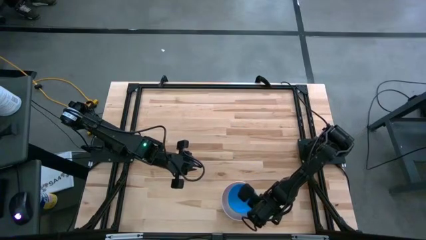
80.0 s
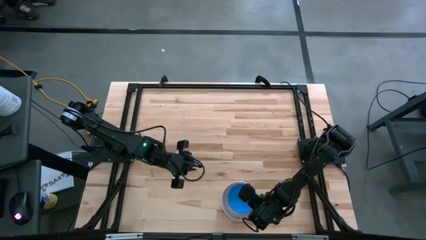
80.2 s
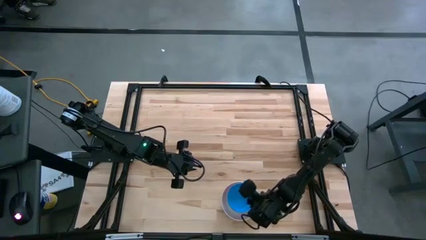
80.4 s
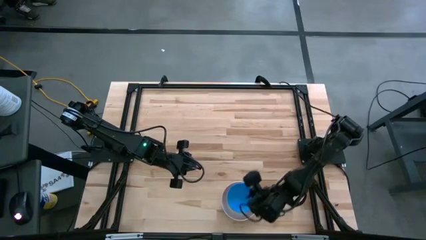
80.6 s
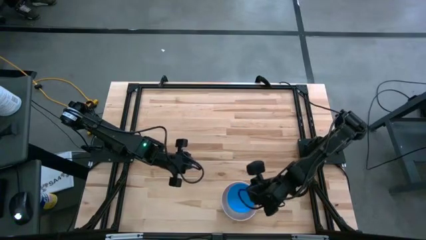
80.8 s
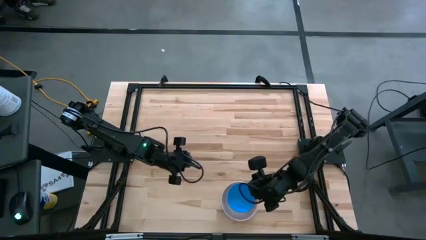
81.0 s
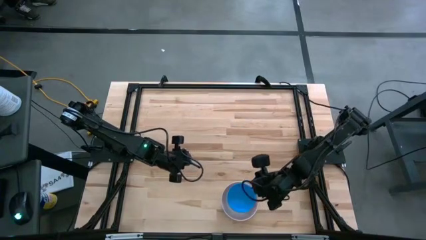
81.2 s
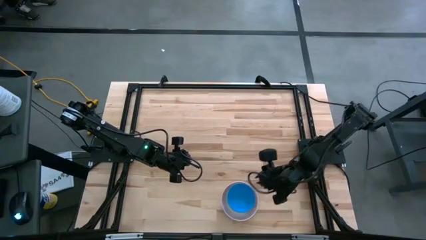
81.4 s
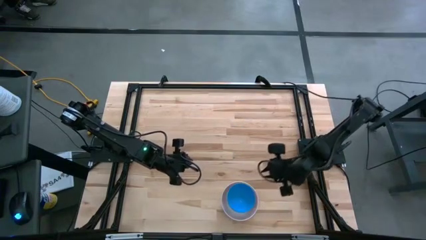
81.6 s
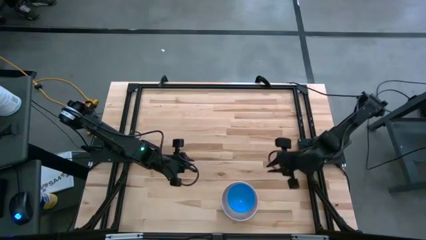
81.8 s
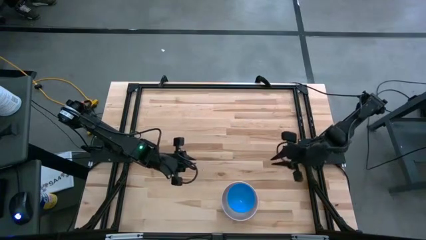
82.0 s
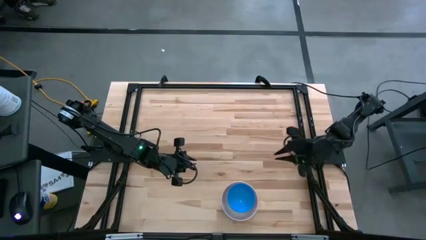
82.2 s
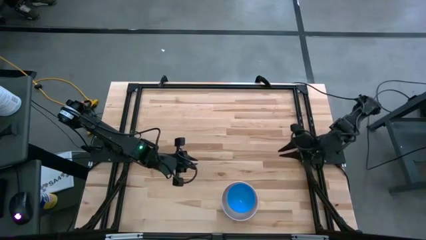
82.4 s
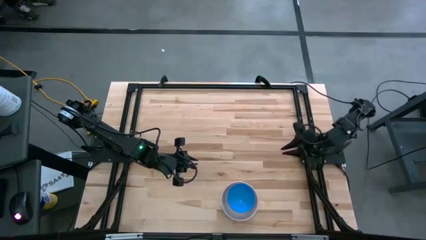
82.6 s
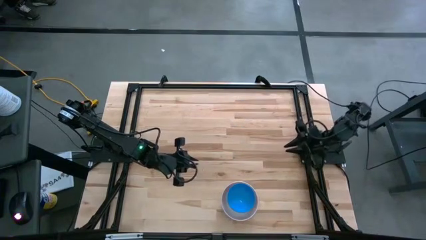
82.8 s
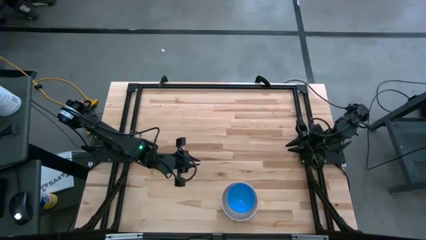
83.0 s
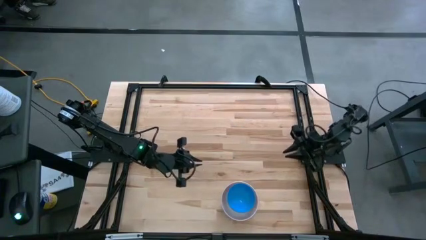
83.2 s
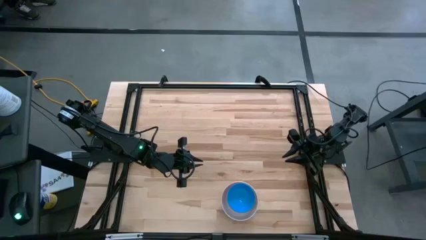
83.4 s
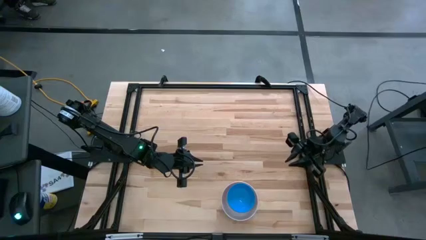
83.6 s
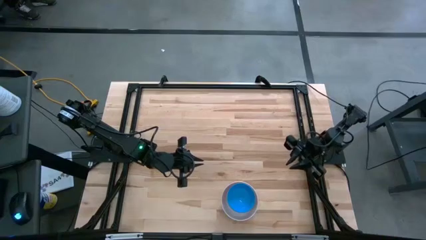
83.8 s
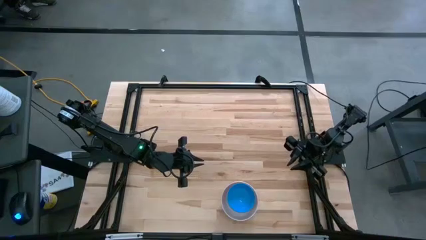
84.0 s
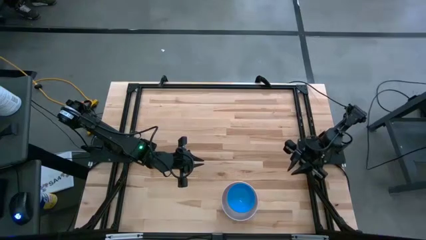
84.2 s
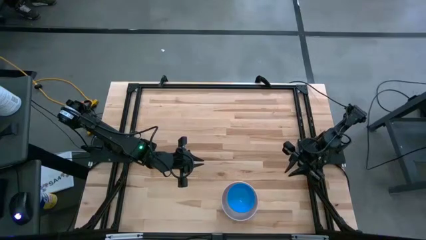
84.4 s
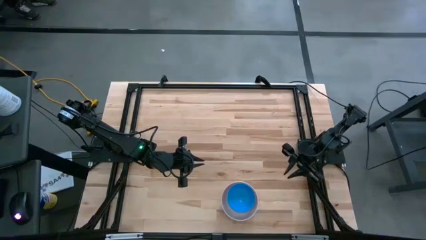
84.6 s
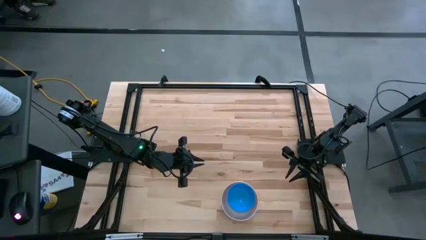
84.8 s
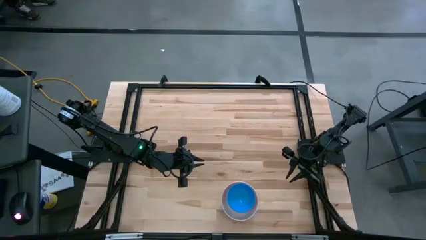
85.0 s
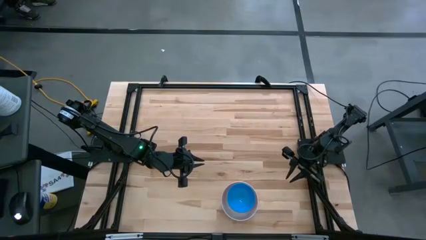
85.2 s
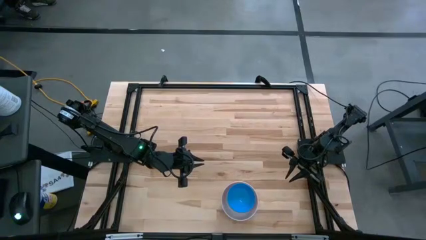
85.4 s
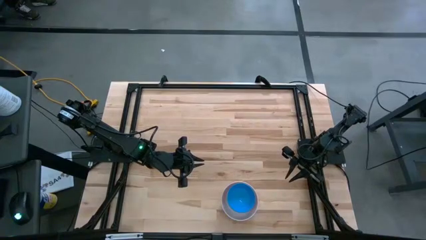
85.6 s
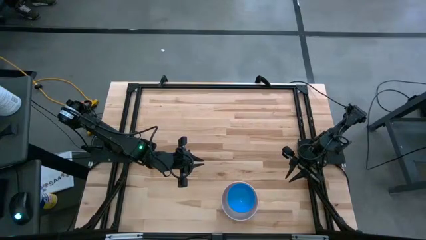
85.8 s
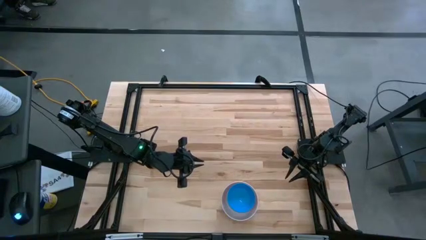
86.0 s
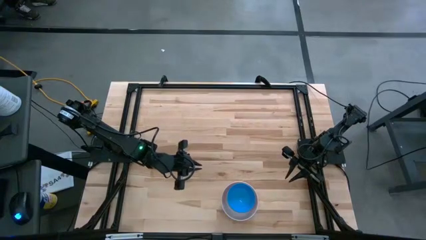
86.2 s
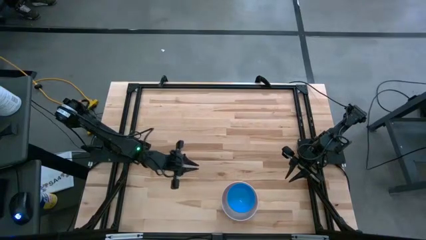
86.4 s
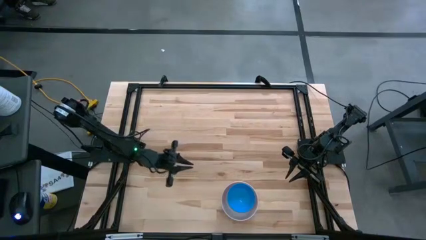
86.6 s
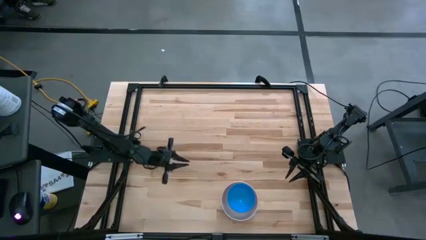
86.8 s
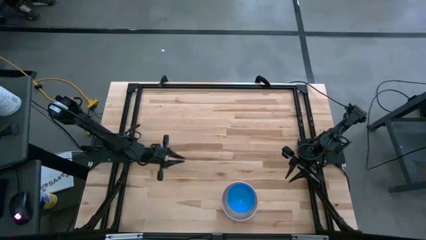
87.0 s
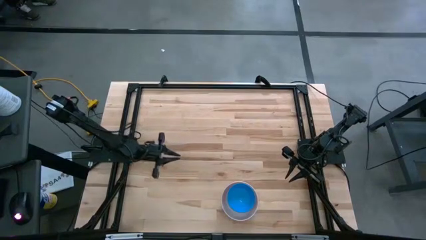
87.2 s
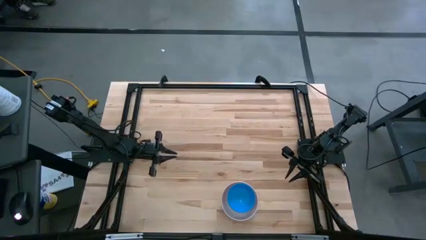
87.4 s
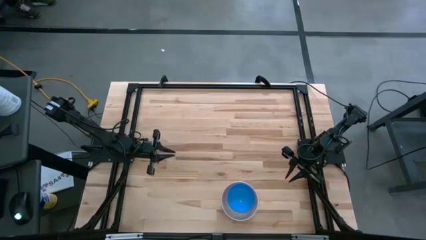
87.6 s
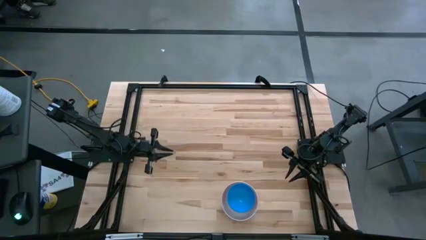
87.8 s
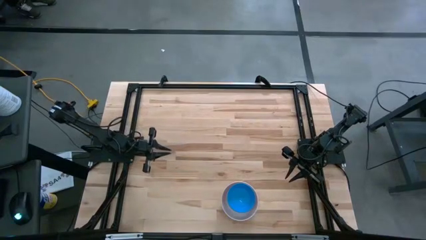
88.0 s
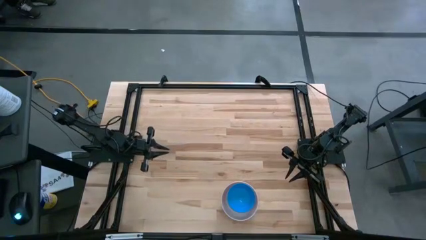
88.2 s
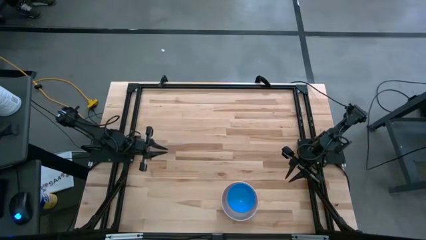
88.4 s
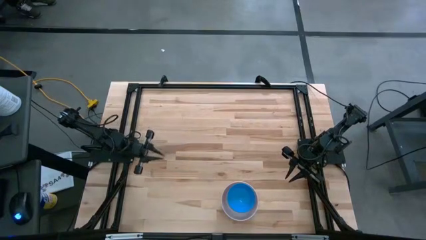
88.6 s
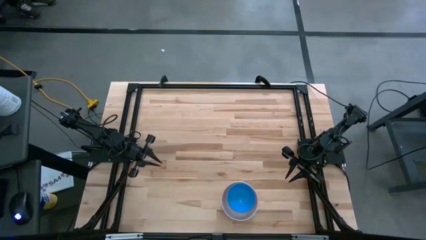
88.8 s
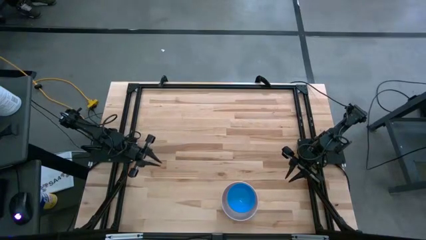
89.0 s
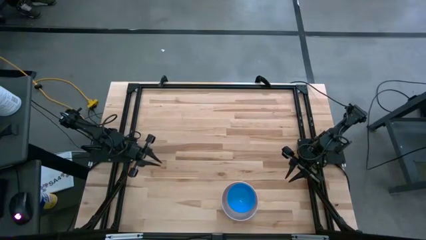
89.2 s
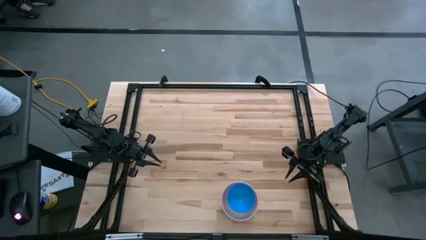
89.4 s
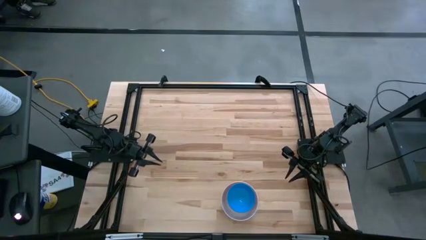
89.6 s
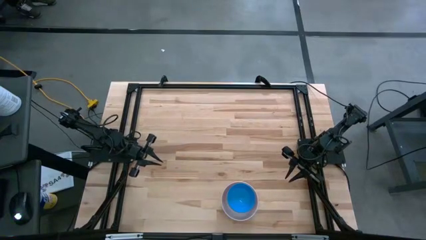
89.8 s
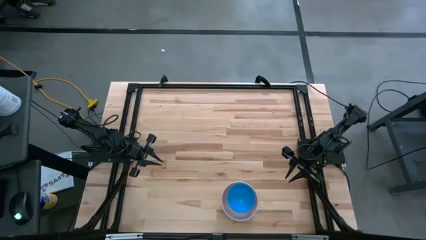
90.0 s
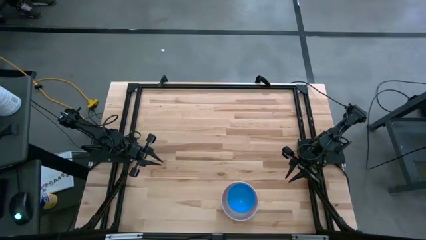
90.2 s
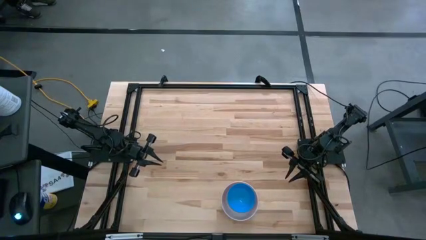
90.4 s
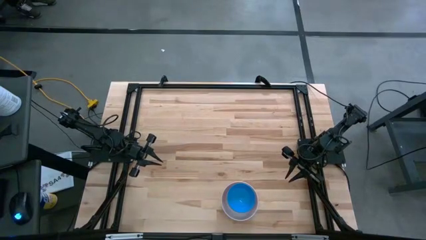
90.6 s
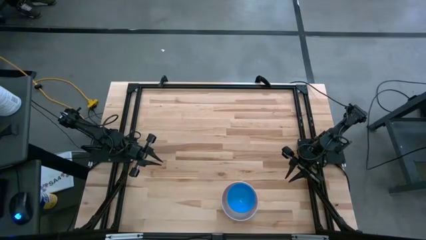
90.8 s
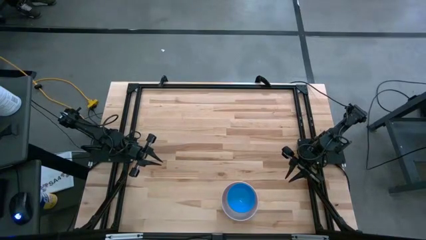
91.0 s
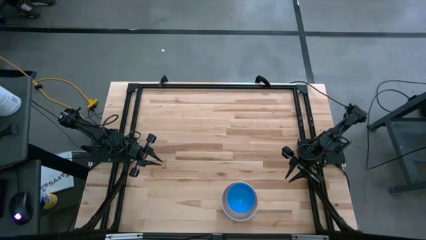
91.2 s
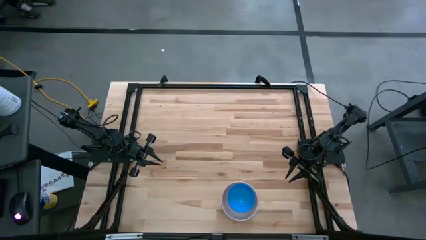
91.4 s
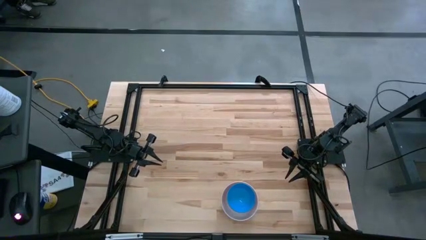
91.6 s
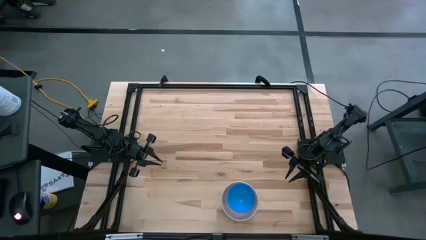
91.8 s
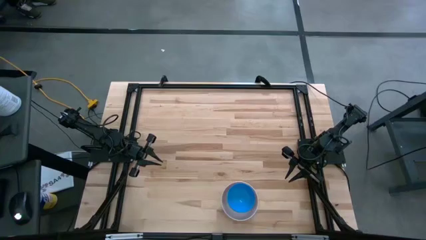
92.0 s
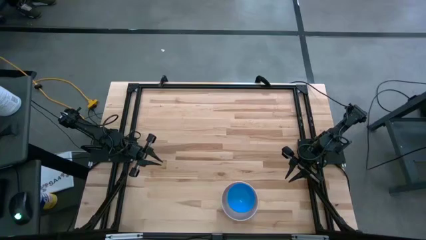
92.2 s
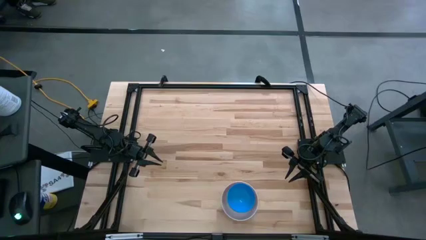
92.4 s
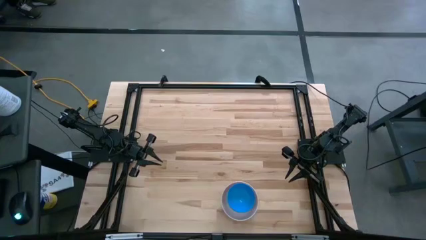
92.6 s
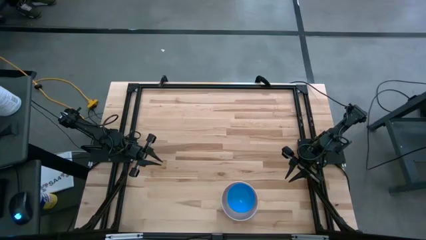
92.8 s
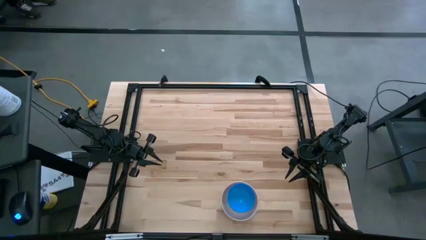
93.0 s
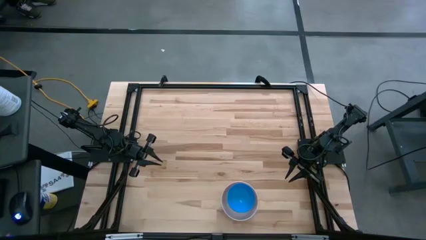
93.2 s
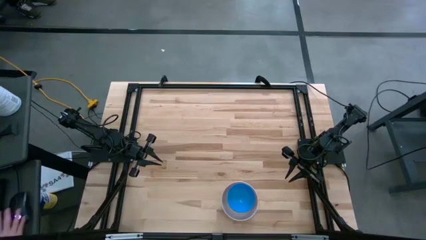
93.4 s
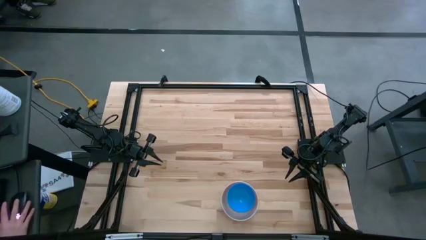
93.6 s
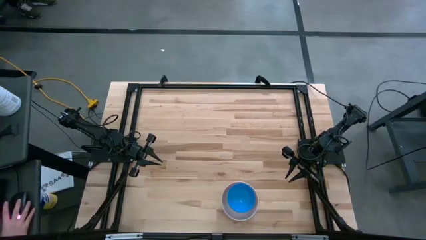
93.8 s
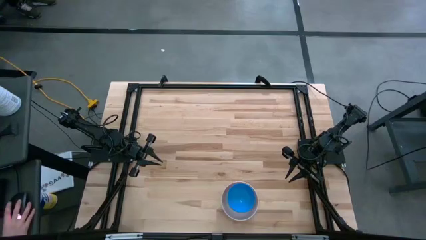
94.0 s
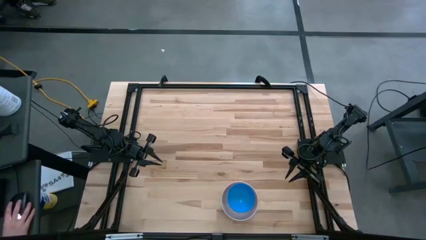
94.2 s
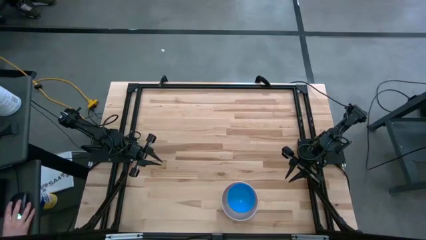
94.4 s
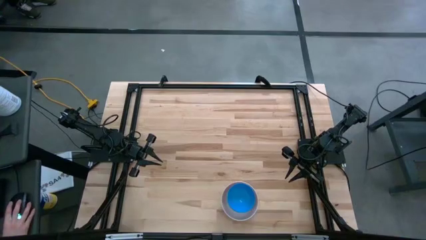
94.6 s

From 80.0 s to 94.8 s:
Return to Home Position
